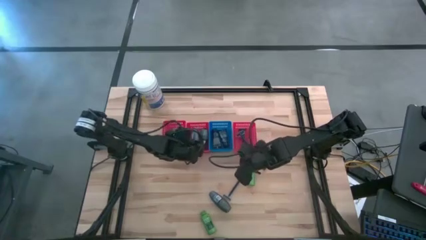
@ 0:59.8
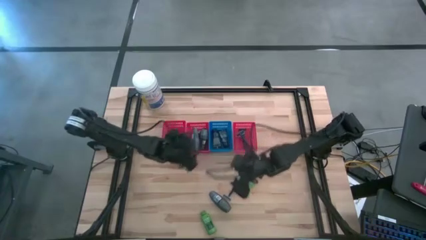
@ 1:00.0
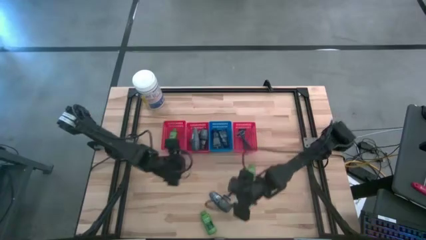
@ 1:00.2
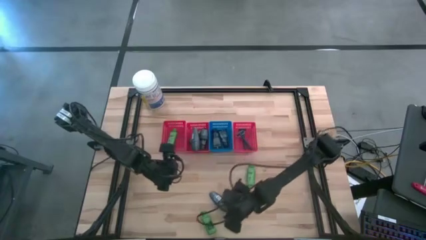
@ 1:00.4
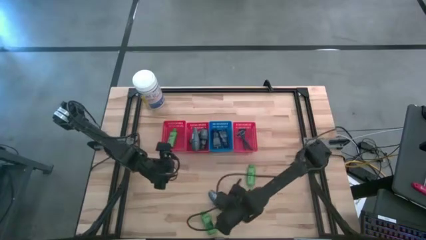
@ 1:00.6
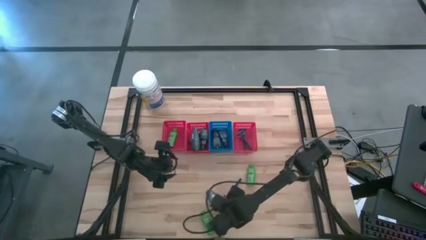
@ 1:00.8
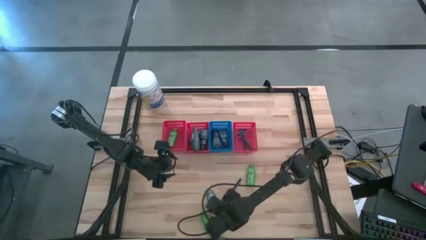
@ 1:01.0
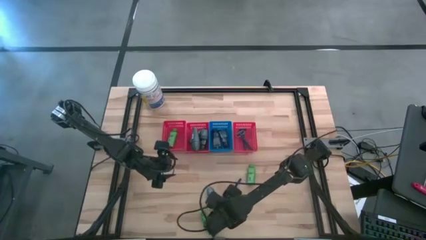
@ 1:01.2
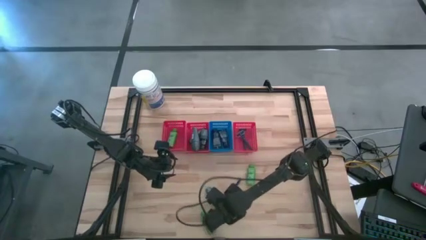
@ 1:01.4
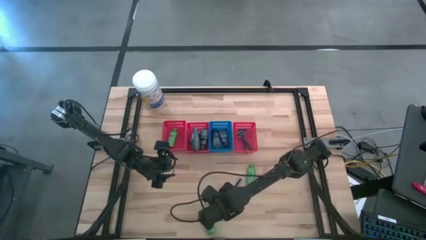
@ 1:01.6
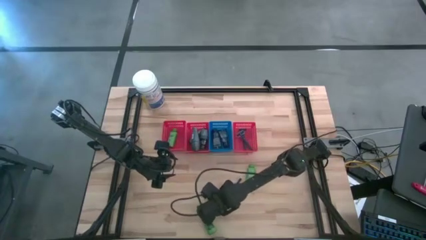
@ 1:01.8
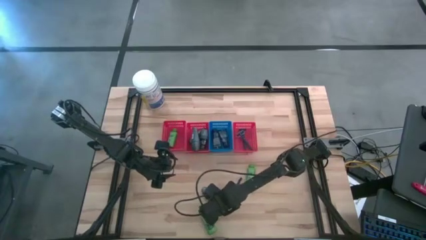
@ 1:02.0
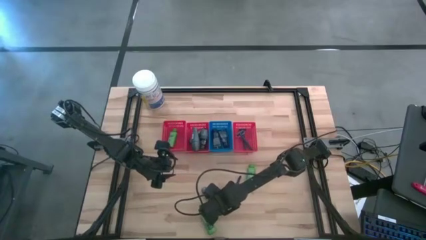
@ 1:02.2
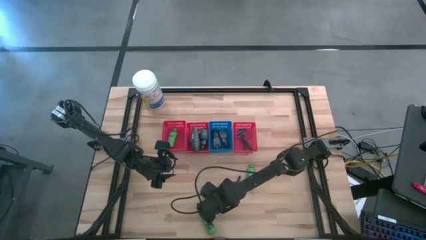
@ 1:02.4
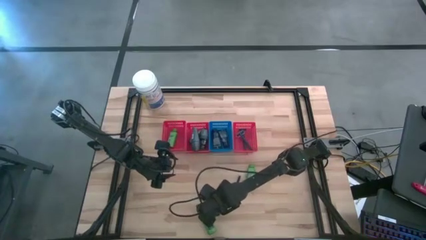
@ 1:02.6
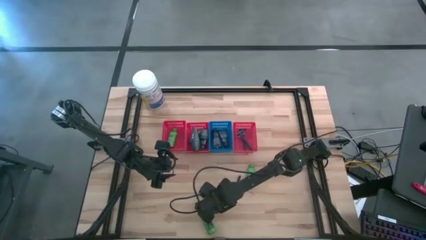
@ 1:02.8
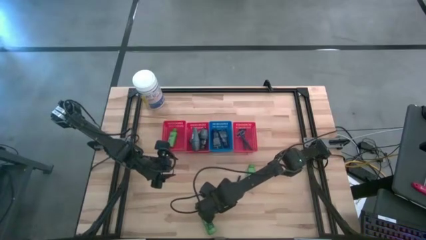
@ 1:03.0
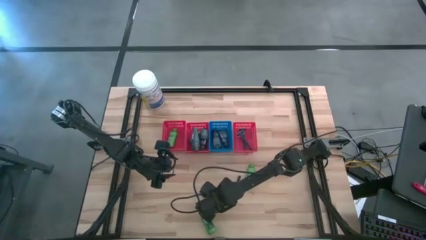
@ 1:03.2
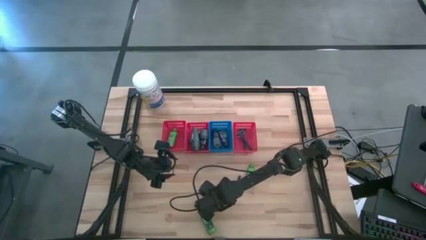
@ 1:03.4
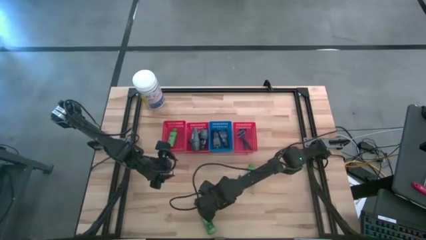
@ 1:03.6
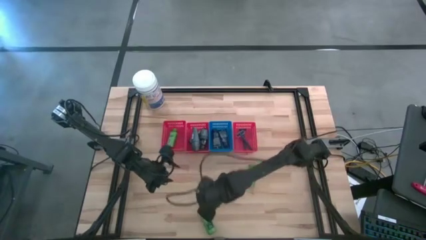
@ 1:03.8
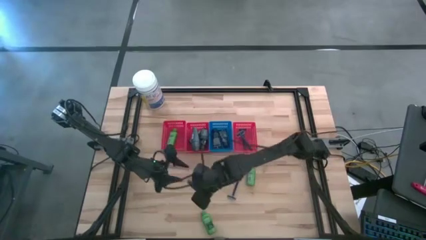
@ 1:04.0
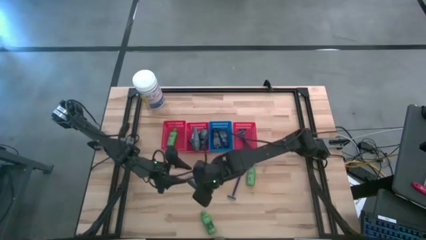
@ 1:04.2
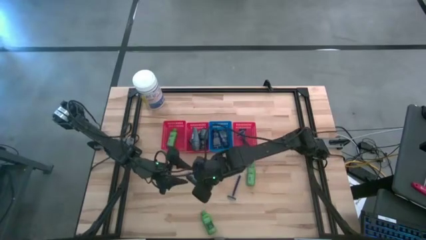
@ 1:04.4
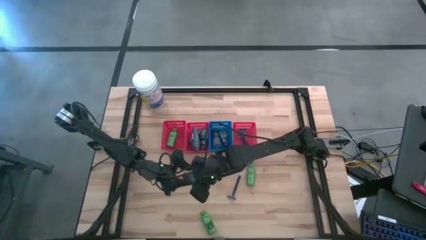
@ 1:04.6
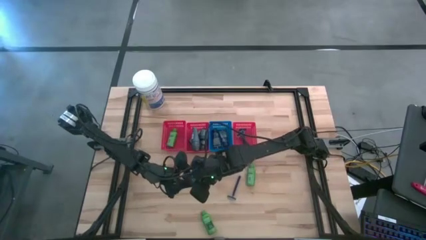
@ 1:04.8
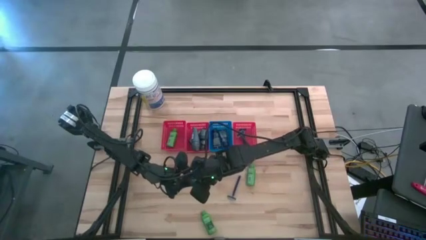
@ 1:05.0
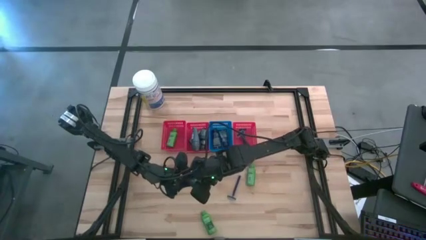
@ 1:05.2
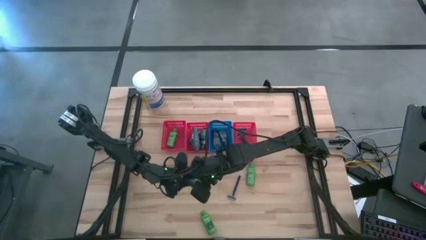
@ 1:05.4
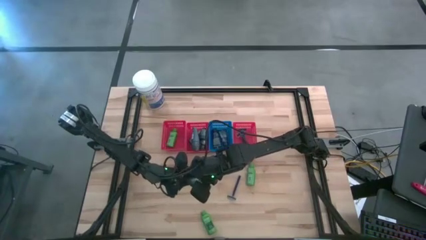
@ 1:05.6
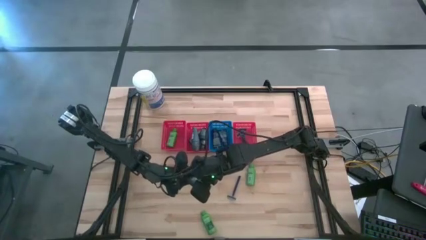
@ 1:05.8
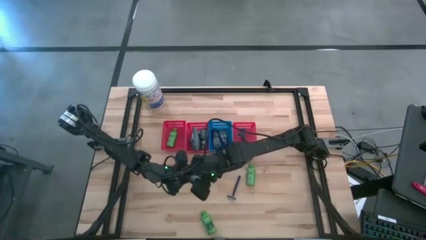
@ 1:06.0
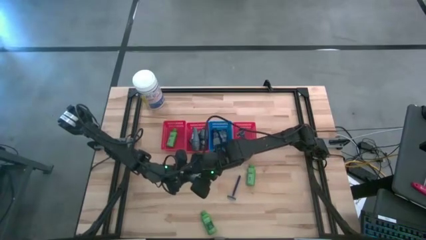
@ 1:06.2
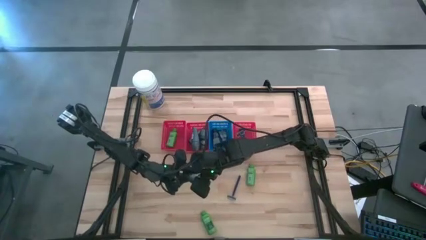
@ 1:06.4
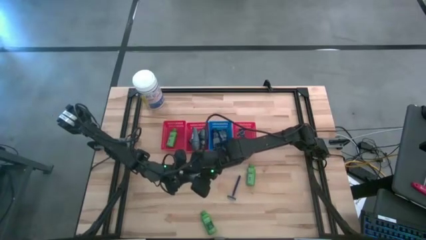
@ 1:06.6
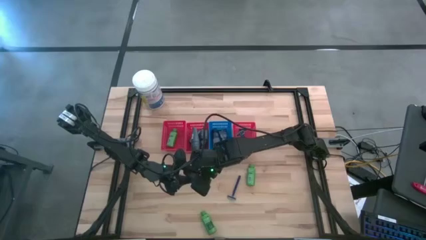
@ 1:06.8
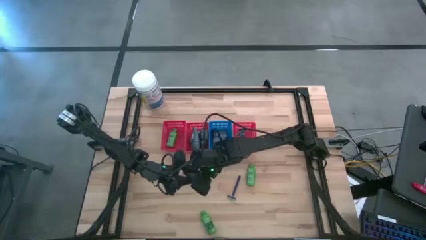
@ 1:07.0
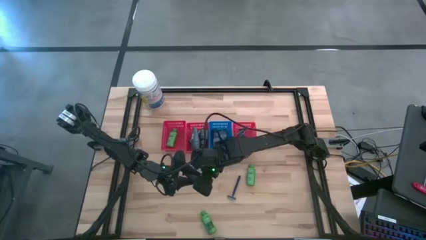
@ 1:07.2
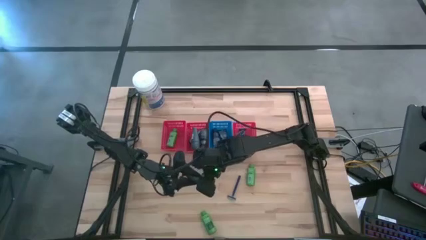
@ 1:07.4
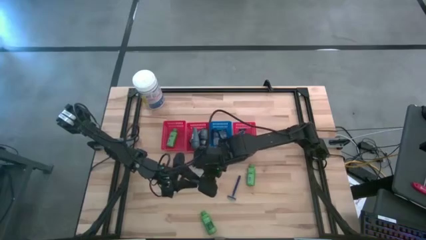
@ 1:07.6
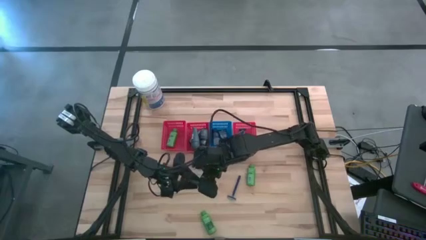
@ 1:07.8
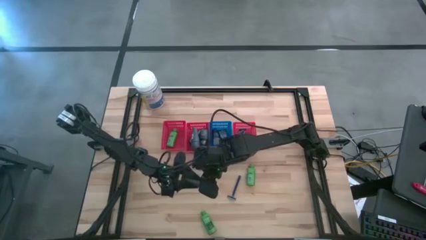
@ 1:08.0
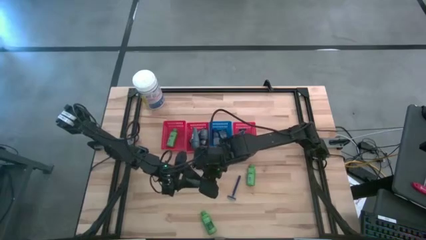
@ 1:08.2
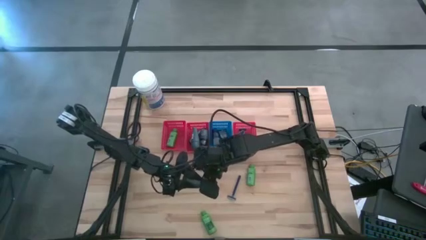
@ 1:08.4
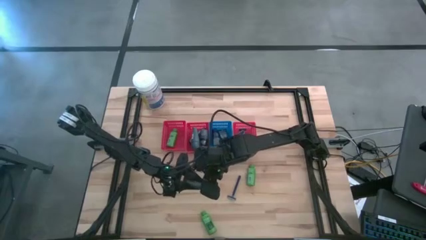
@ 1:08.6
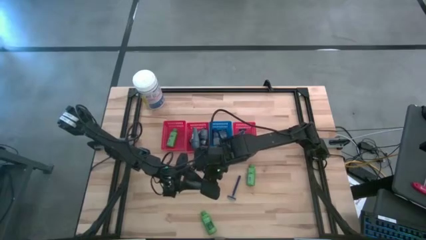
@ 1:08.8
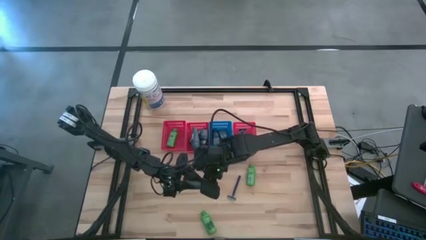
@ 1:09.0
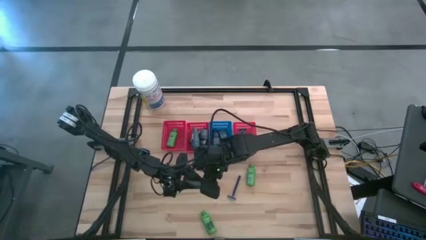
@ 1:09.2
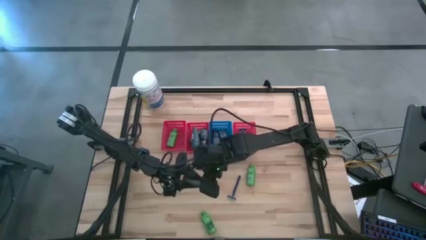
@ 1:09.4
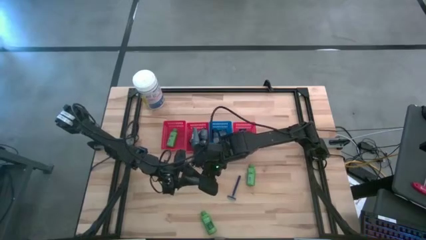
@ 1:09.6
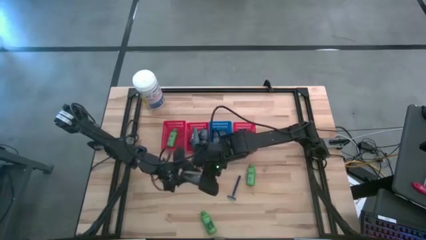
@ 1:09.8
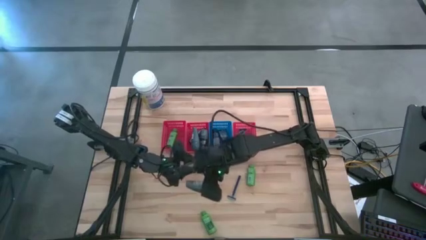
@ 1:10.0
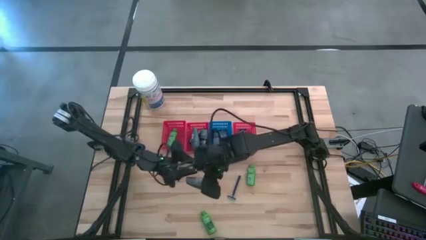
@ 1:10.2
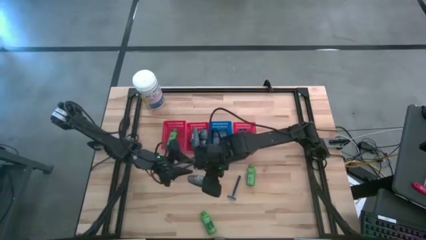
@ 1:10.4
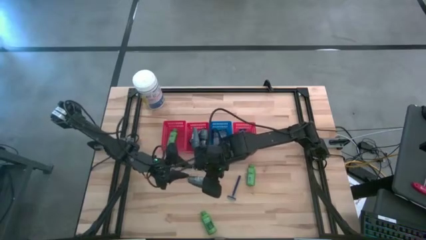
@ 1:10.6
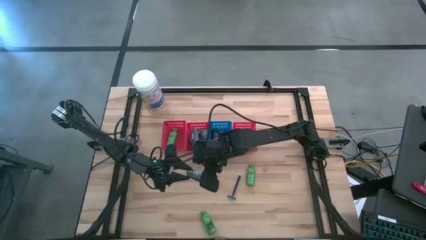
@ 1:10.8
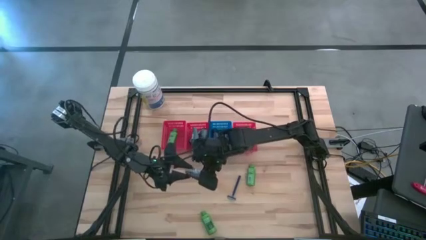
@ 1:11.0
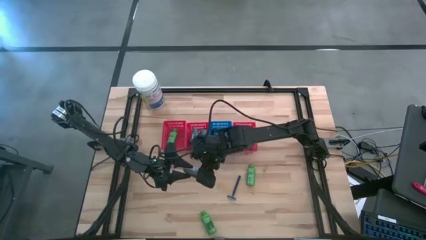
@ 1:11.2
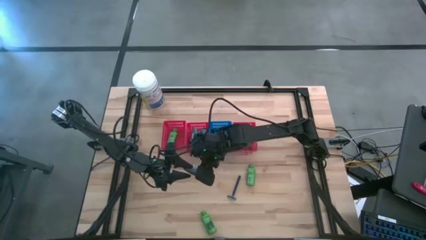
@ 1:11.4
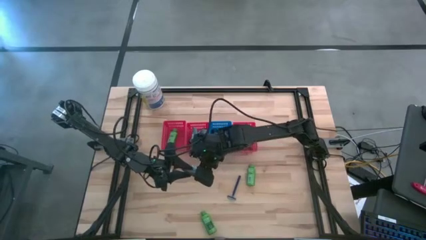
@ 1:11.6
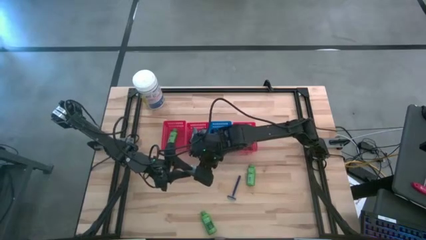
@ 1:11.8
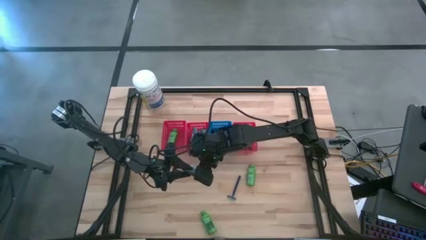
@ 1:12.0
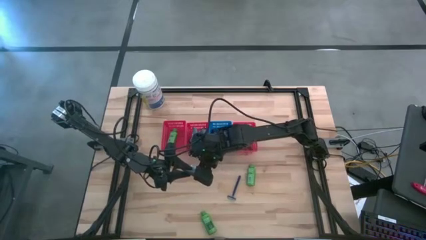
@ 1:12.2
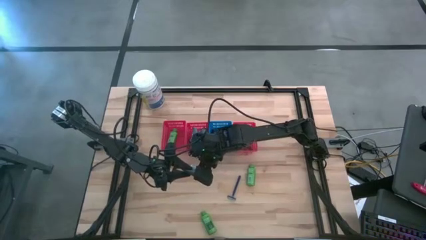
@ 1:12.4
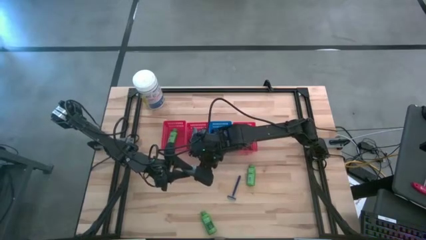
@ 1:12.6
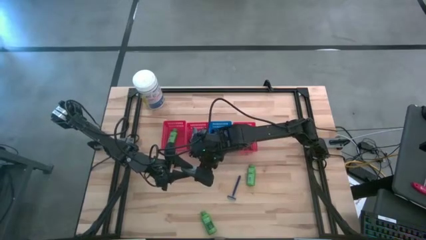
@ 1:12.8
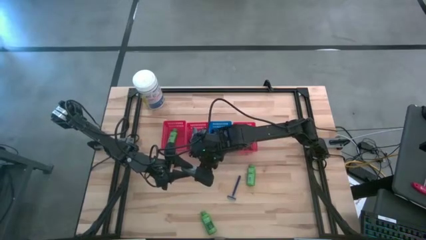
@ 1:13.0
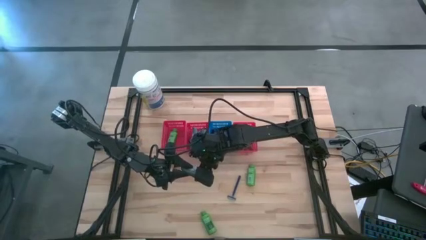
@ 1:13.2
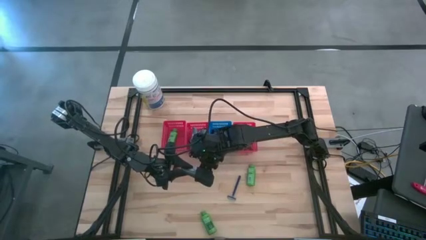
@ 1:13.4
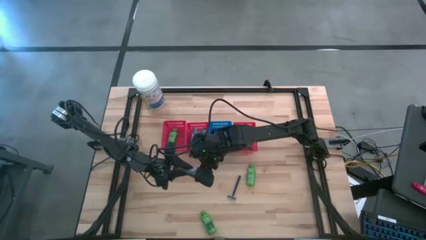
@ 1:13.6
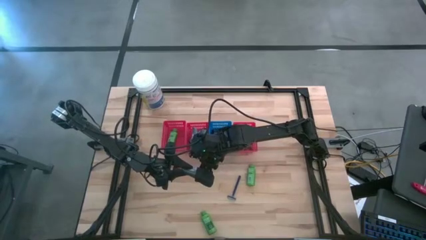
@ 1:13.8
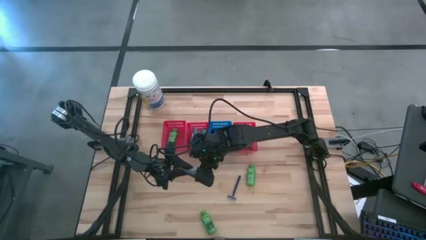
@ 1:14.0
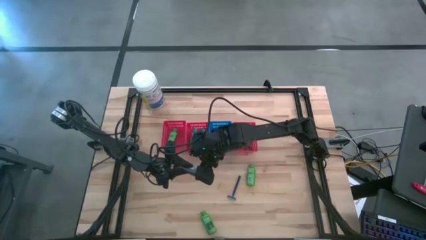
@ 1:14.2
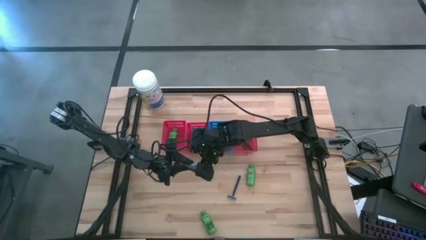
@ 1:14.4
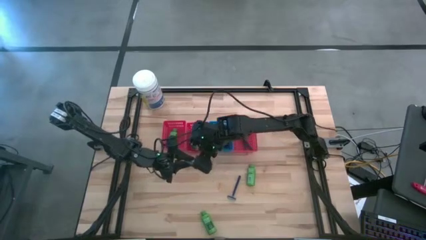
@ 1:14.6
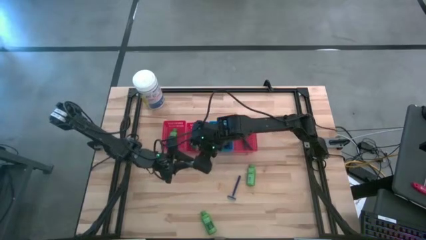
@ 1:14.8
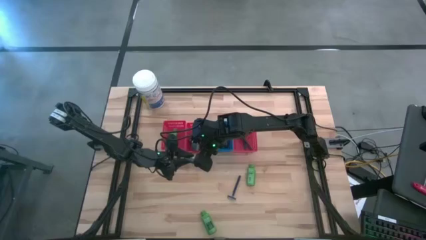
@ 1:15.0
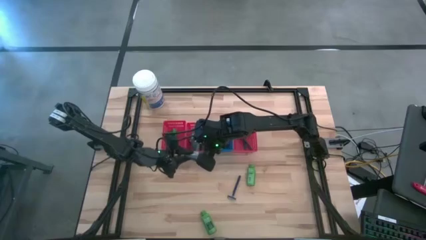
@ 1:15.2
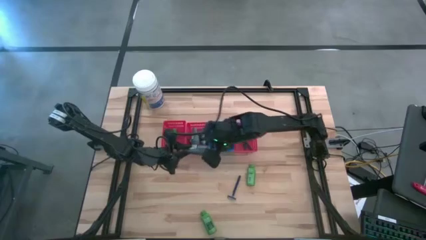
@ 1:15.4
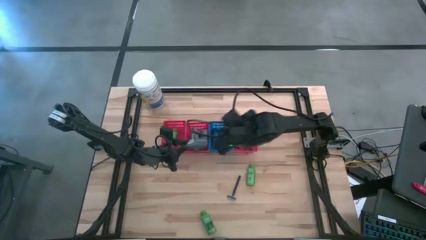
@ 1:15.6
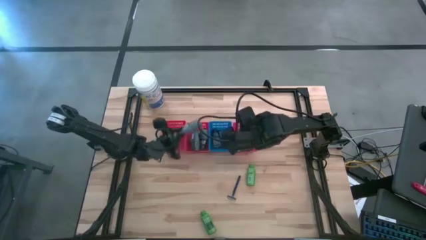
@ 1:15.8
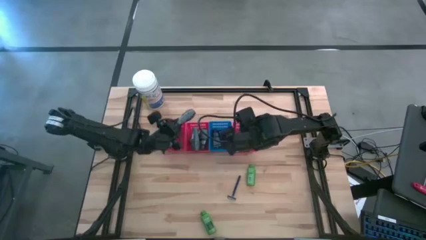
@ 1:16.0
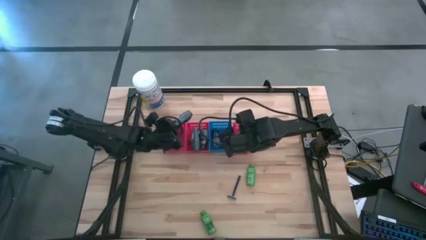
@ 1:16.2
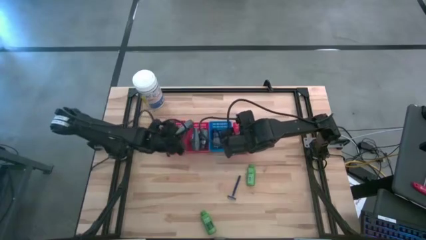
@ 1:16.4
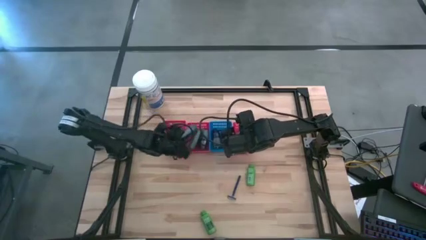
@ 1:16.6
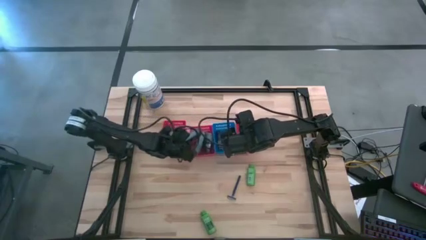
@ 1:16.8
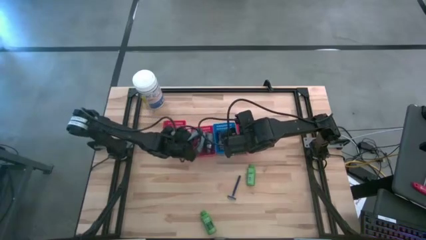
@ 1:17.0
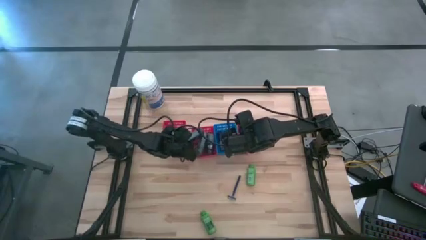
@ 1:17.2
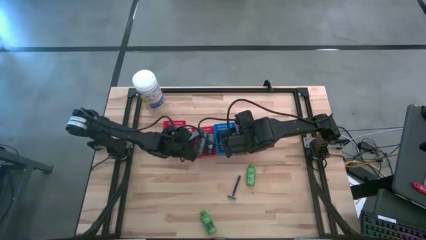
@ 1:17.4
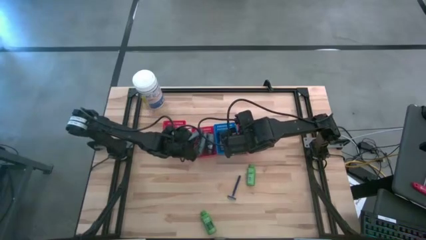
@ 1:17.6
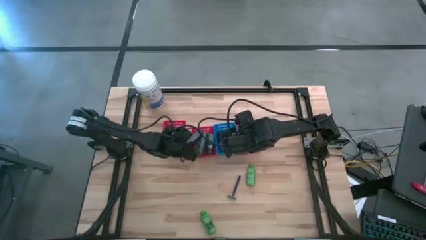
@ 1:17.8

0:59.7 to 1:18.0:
Task: Pick & Place Travel size toiletries
Put the gray deodorant into the middle red bin
